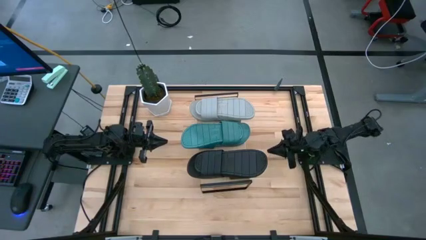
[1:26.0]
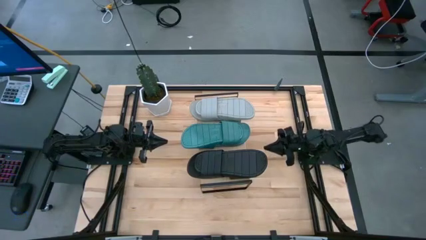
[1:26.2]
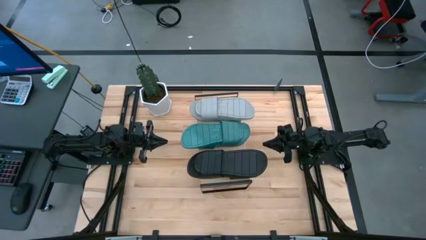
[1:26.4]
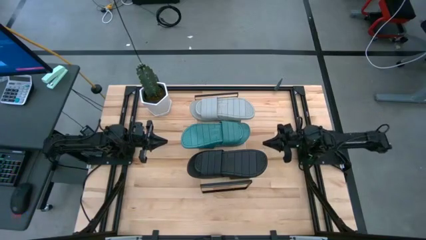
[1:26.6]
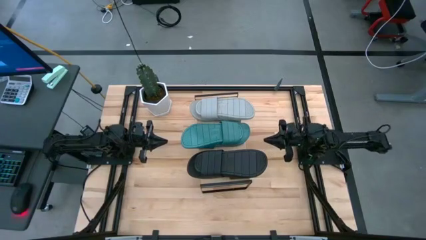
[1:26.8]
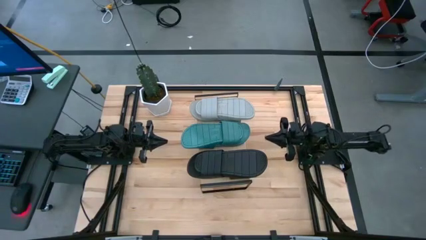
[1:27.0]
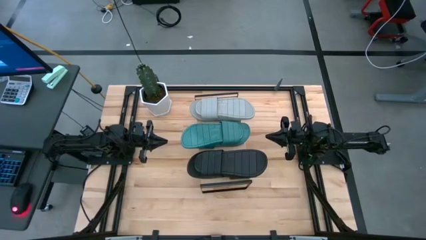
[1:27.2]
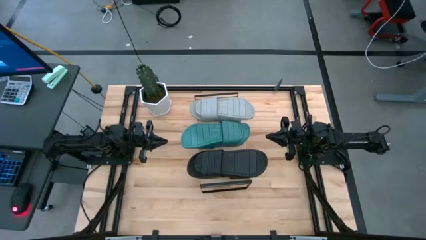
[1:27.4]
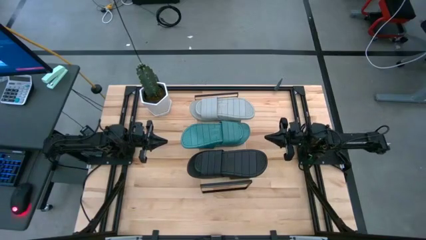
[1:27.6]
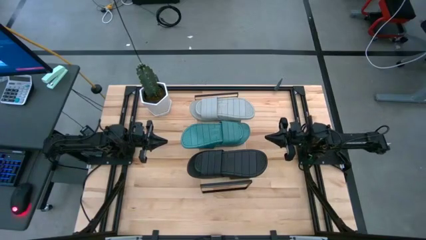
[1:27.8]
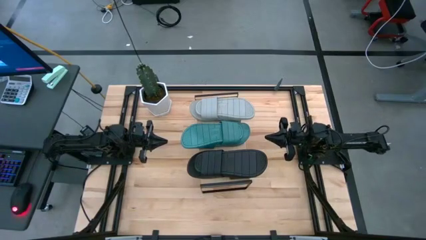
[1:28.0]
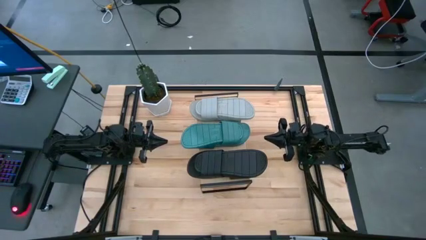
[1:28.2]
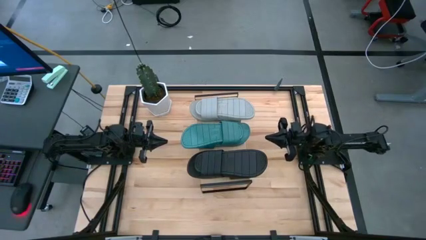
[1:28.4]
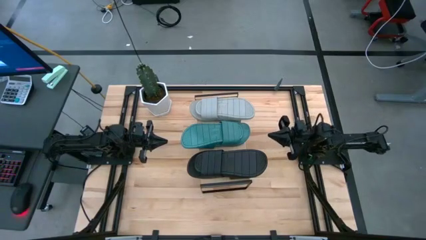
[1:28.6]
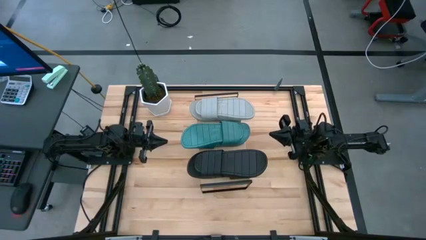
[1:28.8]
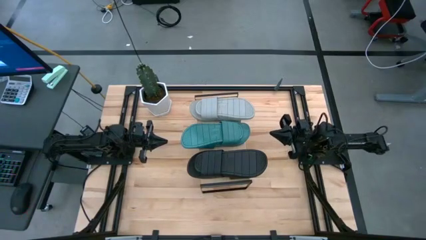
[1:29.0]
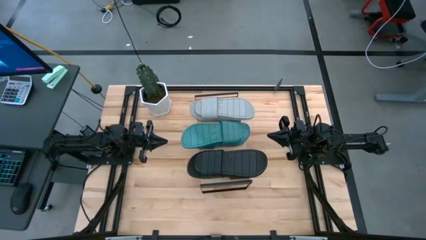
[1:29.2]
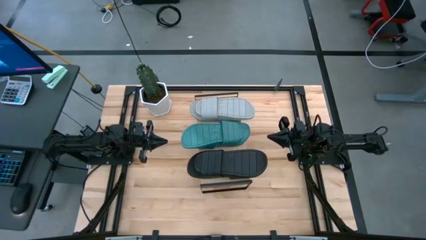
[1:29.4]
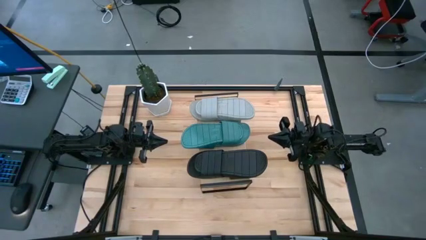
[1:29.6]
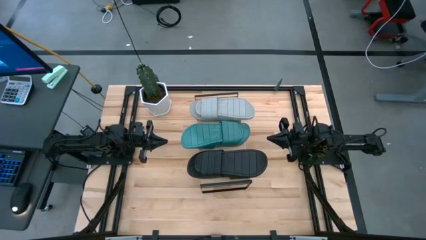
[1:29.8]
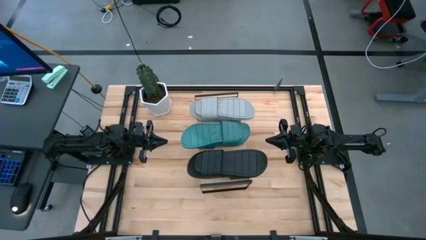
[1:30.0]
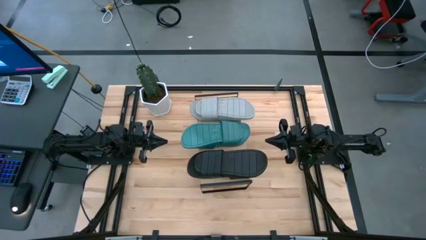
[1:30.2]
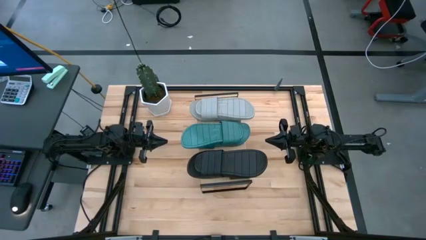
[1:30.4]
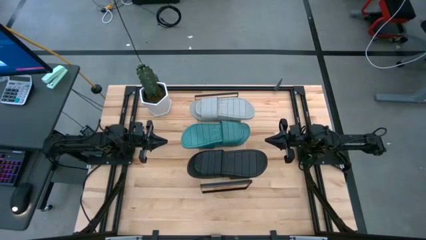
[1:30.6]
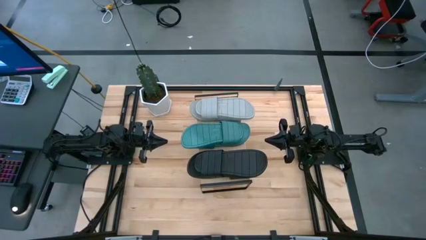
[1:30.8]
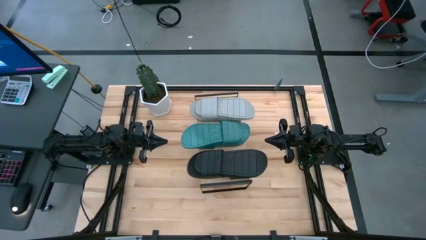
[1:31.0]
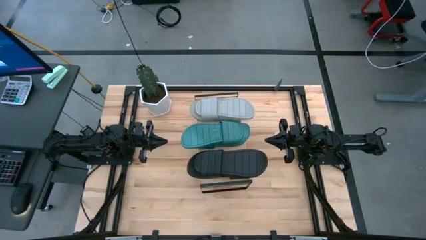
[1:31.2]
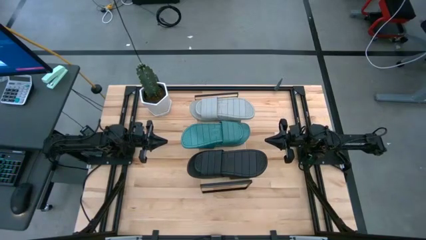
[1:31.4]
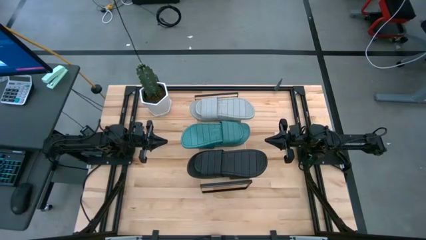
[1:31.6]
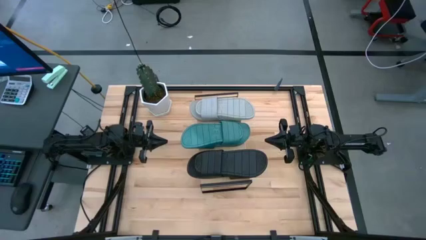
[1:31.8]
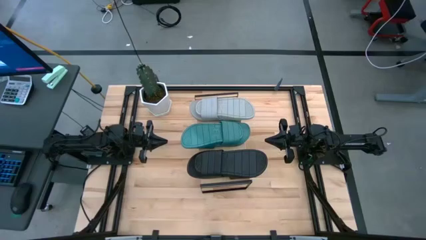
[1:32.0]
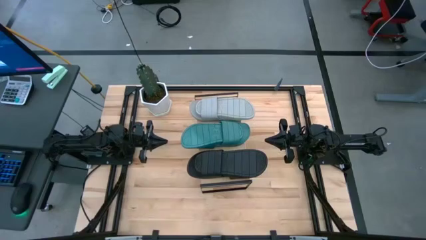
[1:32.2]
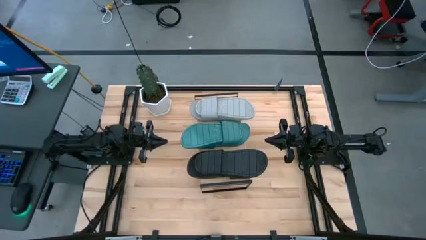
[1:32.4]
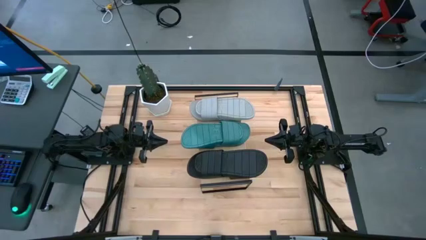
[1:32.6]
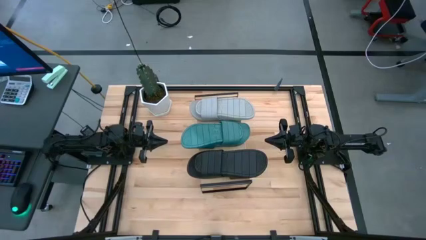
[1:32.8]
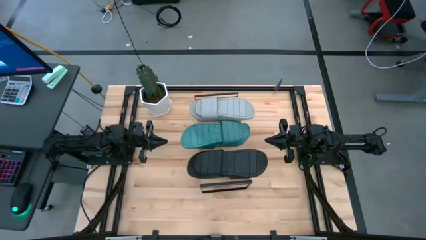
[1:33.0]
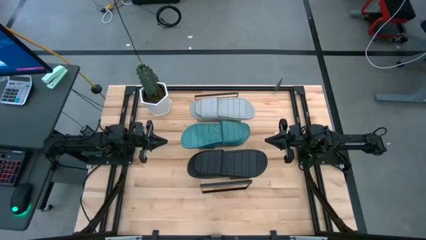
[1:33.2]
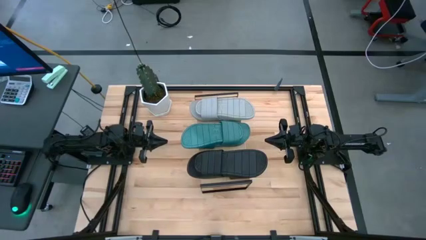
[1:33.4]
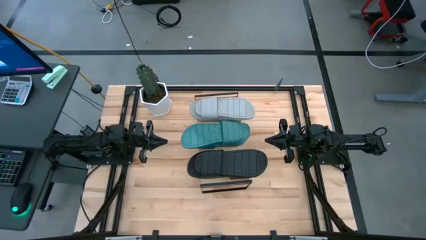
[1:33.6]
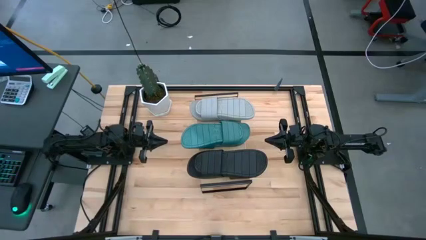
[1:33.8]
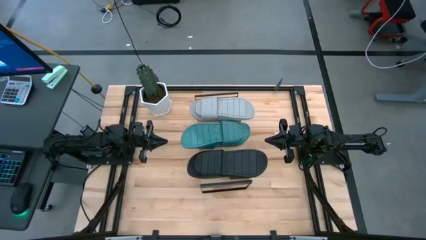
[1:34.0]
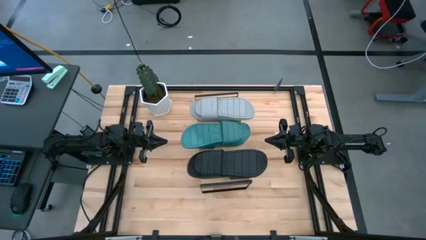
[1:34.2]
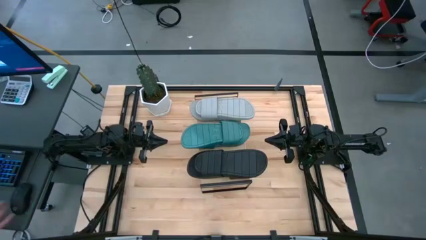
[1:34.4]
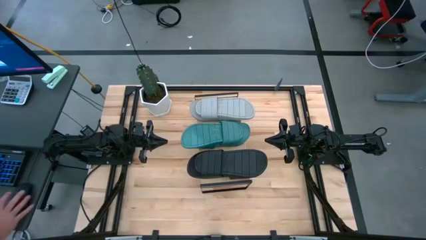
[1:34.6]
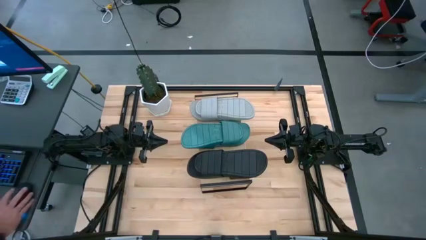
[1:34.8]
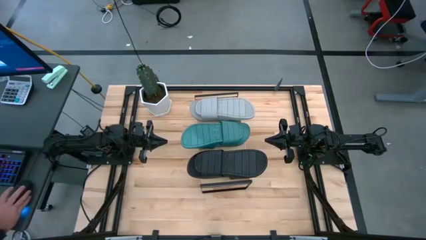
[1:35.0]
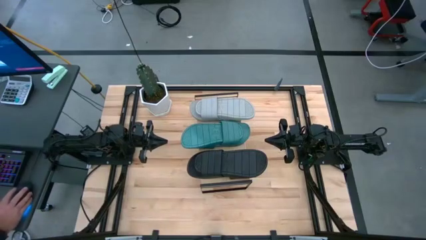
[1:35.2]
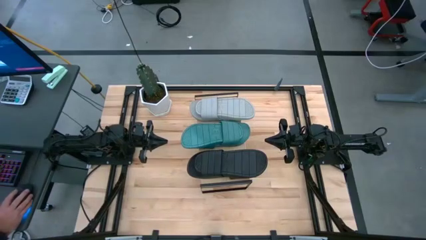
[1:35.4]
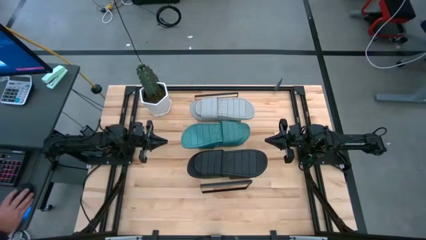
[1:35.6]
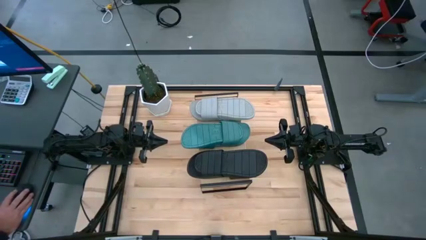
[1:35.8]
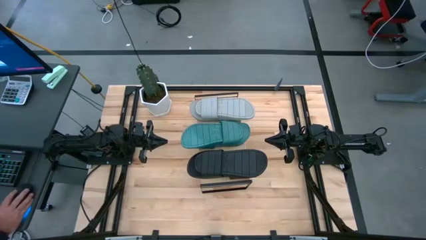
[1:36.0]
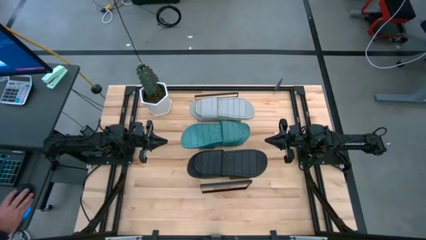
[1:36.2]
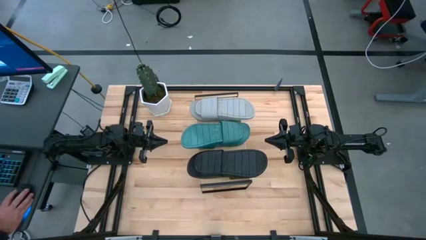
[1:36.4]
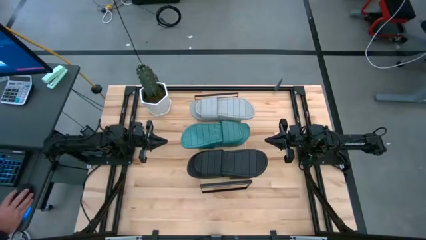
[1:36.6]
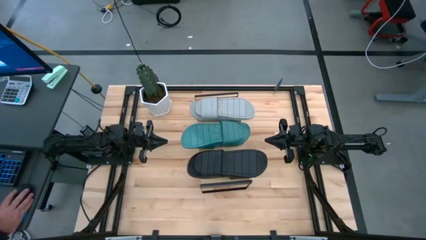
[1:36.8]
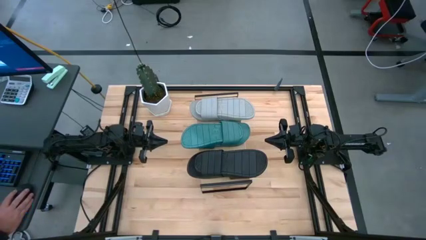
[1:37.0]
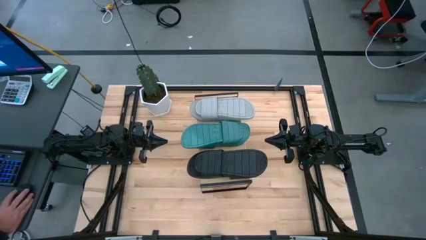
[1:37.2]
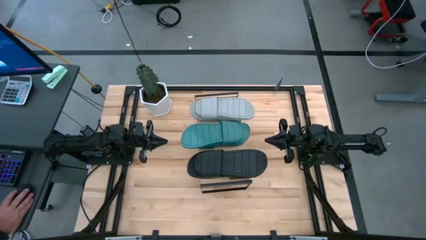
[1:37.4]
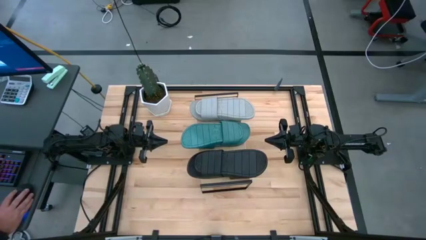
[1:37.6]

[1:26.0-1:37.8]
Task: Pick and place slippers onto the shelf
Return to Home Position

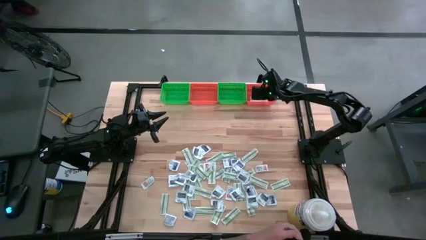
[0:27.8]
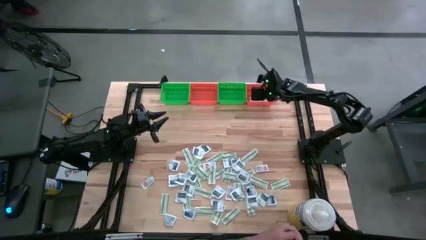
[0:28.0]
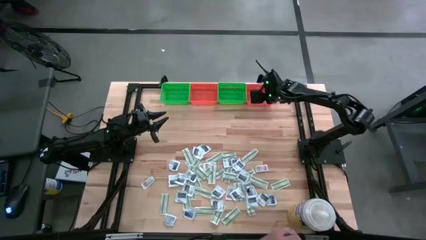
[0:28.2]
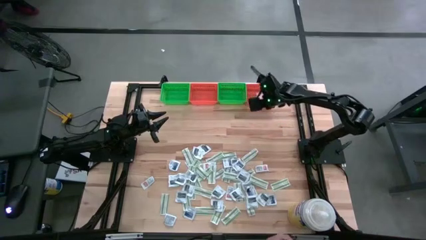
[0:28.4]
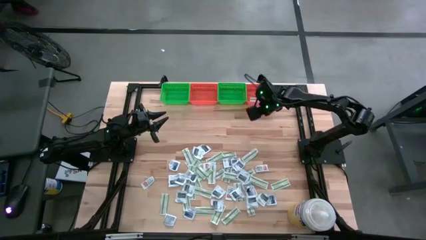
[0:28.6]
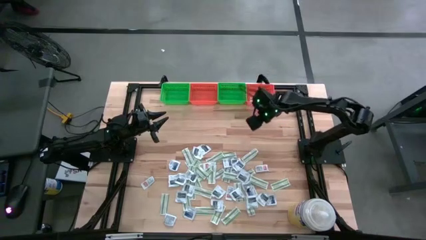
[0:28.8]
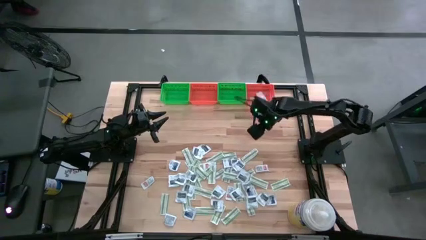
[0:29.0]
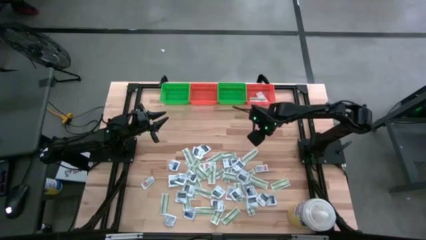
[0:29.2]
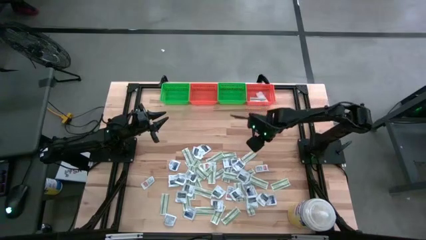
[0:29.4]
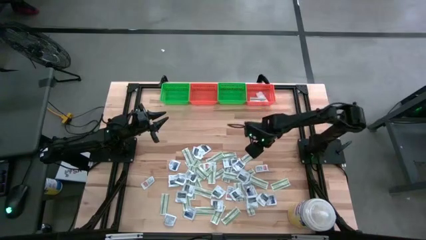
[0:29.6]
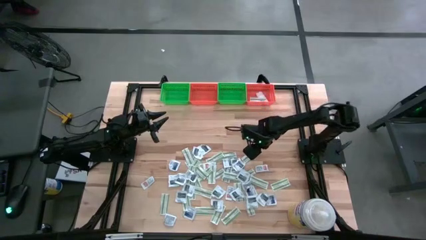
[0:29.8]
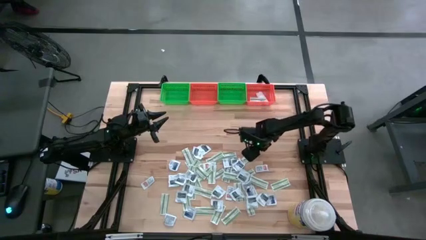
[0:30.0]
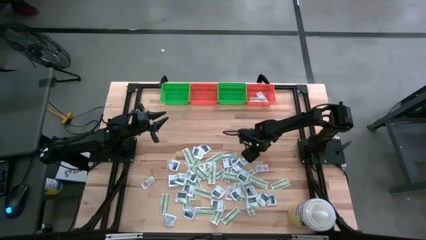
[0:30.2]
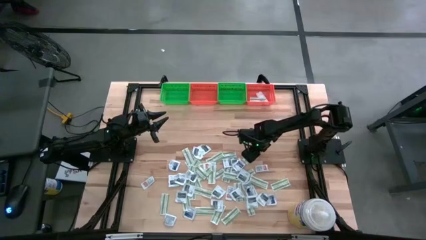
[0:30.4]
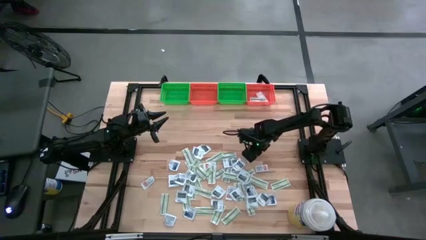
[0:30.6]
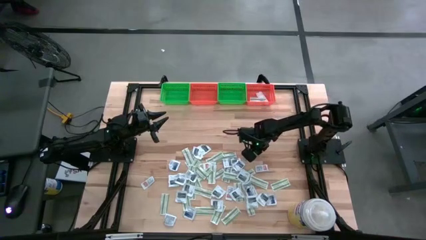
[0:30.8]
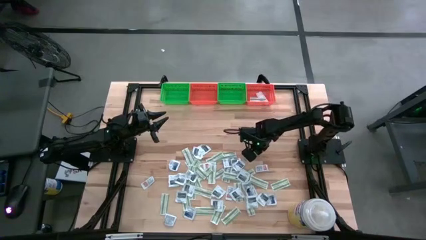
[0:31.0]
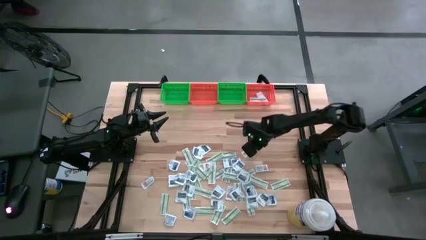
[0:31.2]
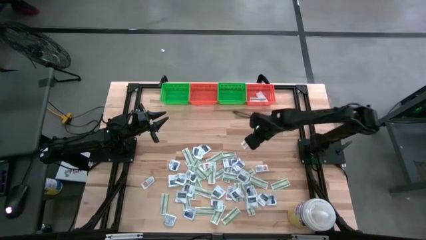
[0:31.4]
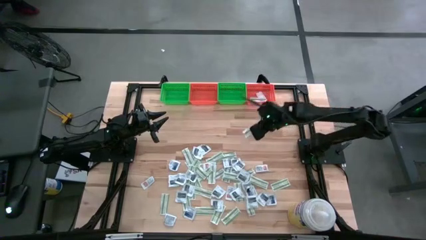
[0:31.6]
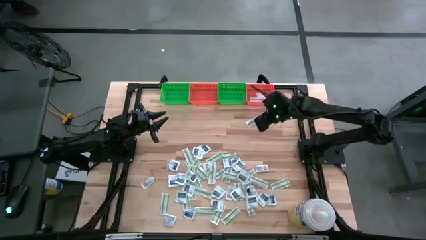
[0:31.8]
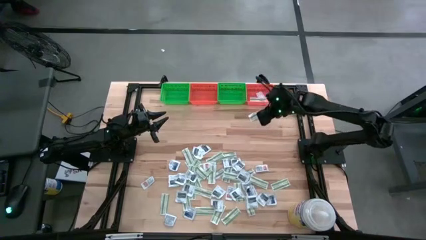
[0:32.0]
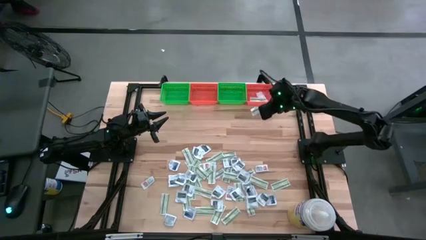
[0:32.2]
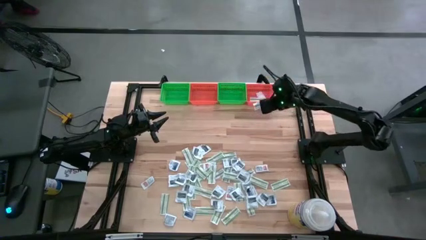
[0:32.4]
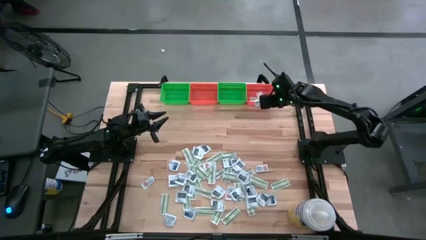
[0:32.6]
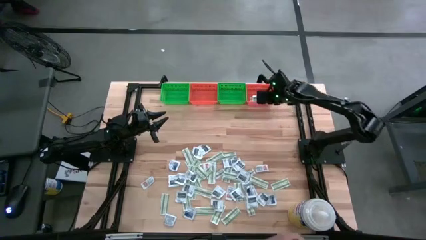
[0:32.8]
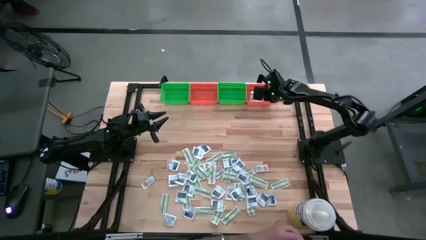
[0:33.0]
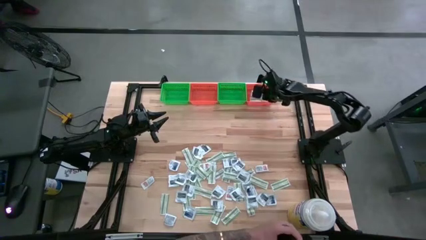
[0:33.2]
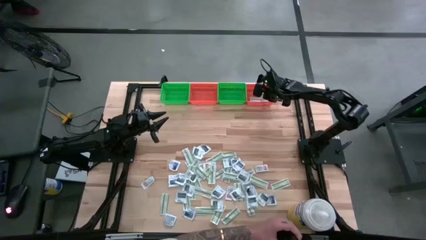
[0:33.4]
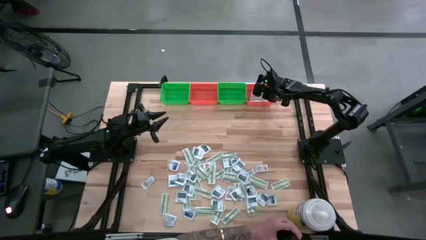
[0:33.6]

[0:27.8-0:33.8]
Task: Pick & Place First Aid Supplies
Put the green bandage pack in the right orange bin
